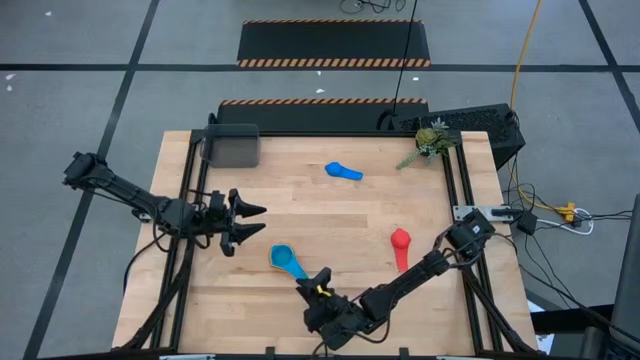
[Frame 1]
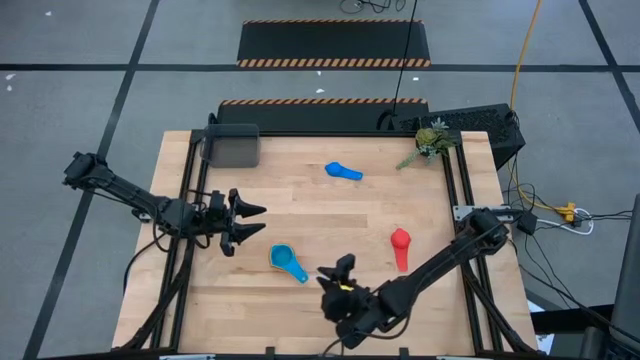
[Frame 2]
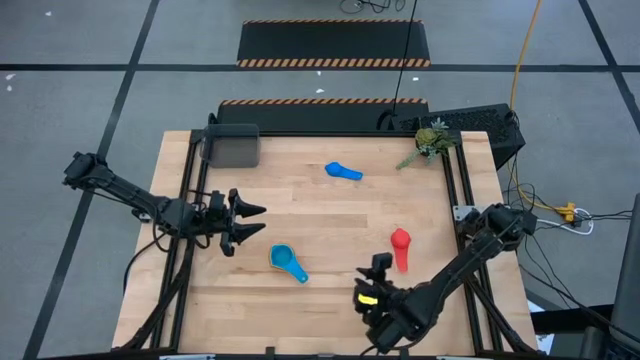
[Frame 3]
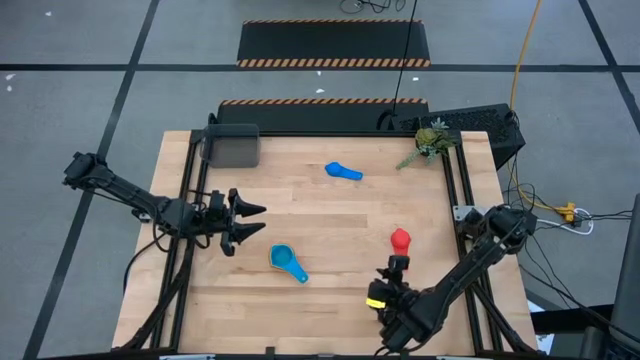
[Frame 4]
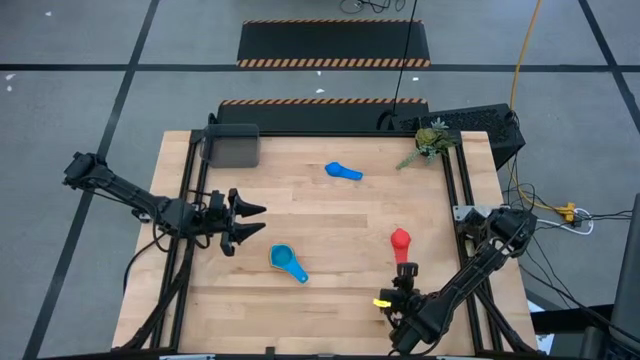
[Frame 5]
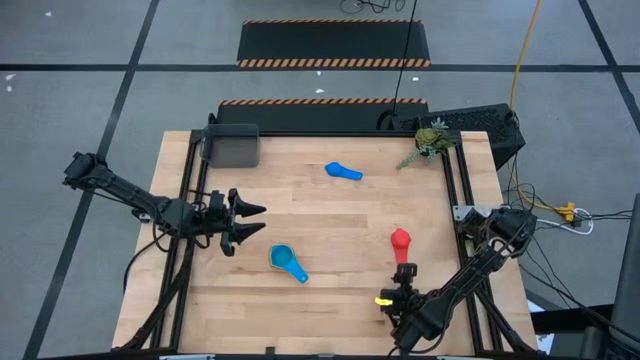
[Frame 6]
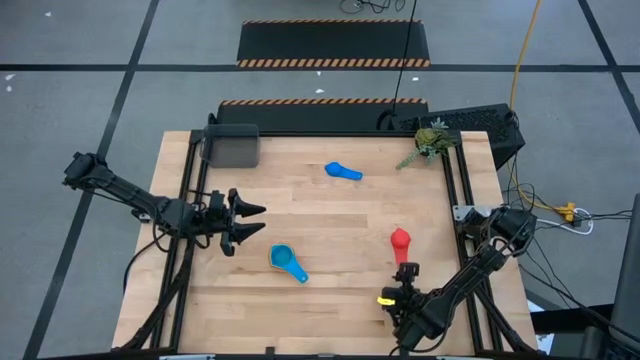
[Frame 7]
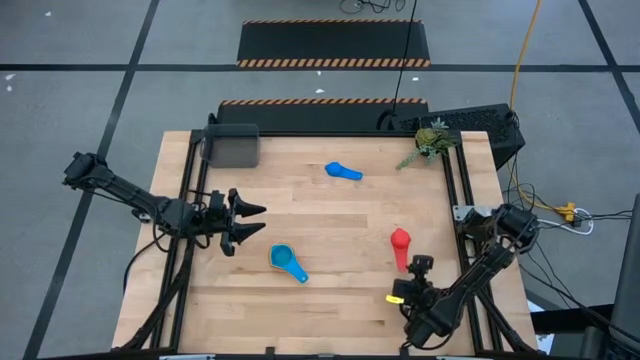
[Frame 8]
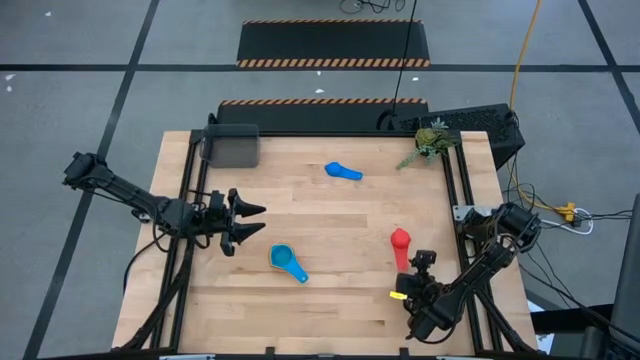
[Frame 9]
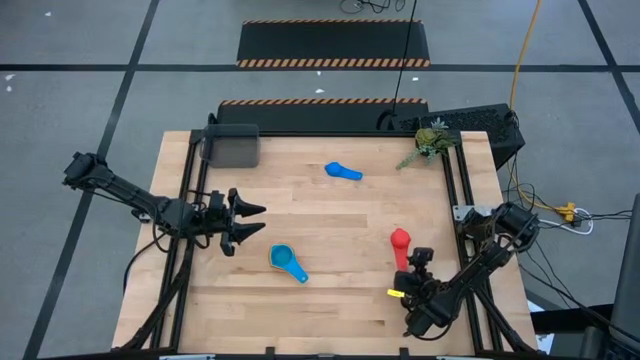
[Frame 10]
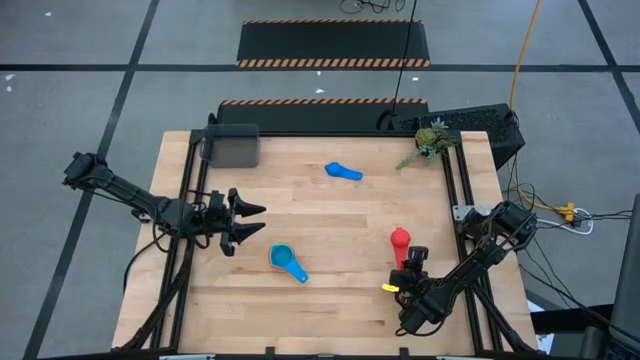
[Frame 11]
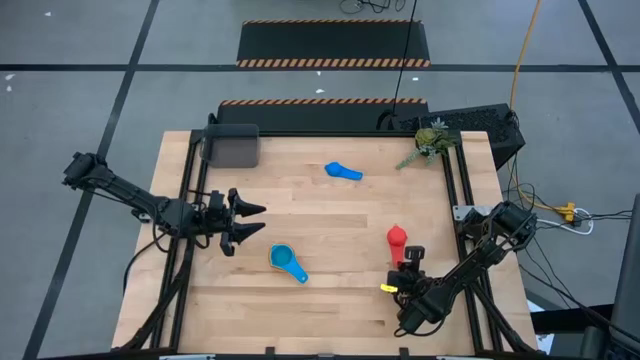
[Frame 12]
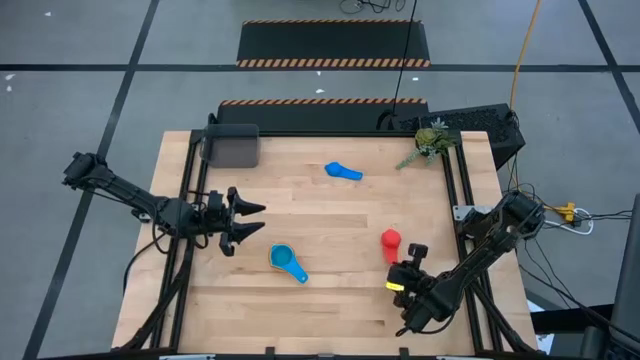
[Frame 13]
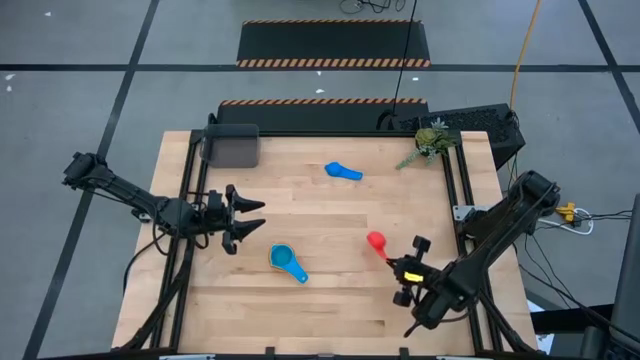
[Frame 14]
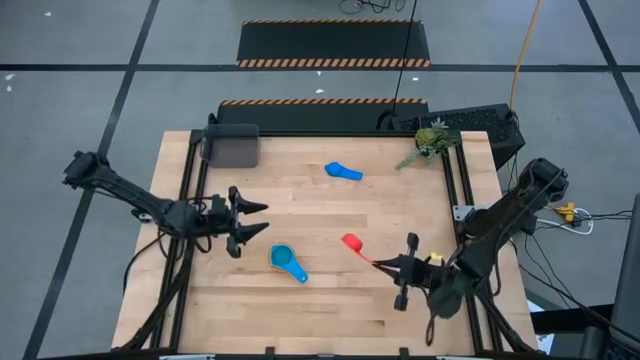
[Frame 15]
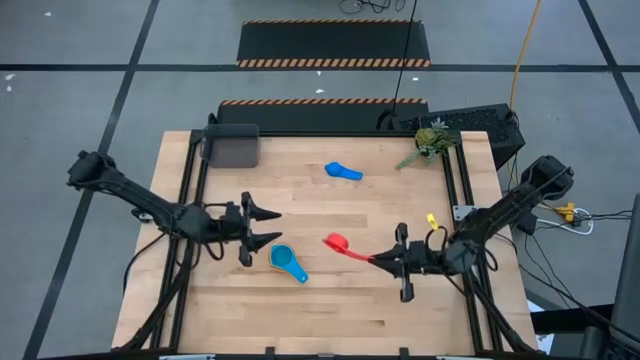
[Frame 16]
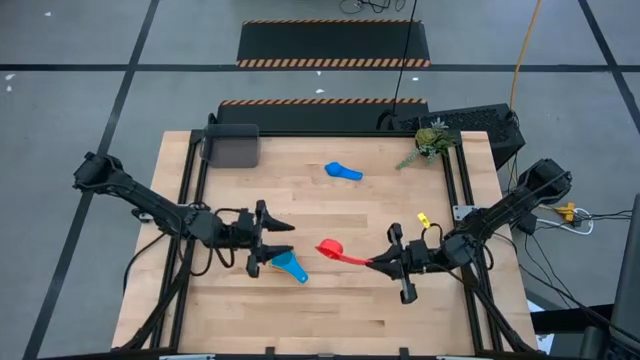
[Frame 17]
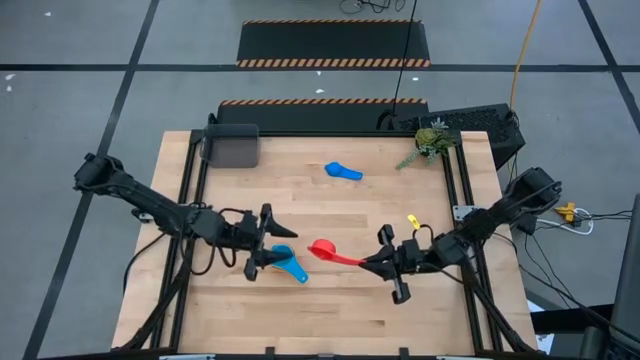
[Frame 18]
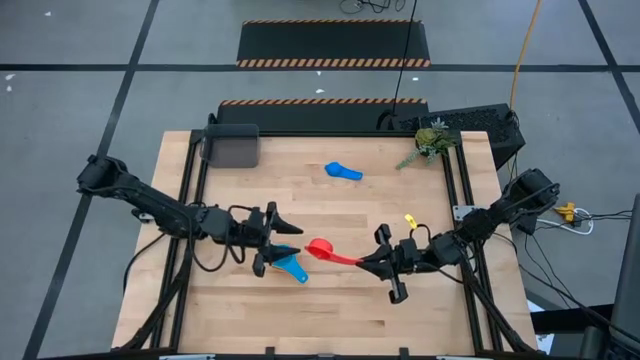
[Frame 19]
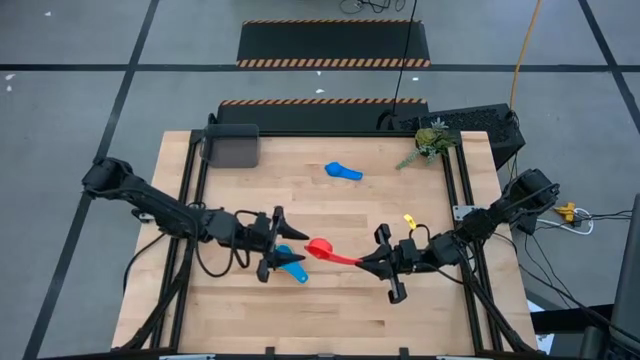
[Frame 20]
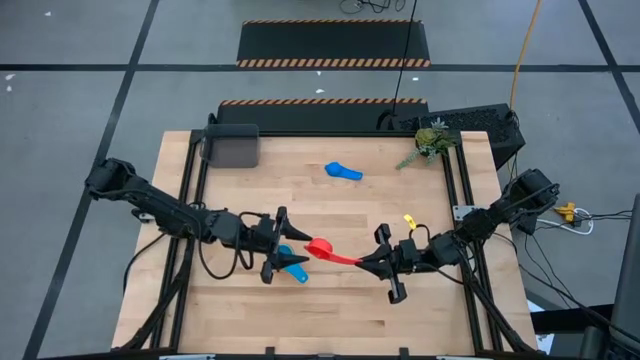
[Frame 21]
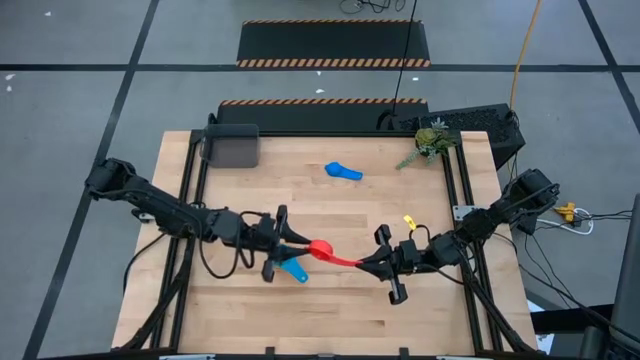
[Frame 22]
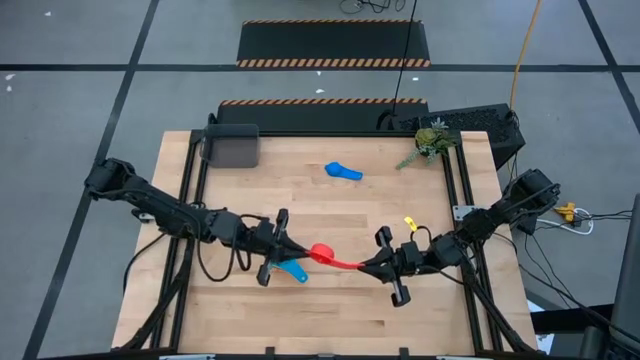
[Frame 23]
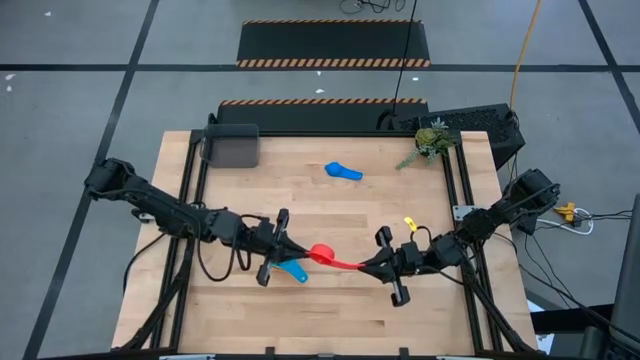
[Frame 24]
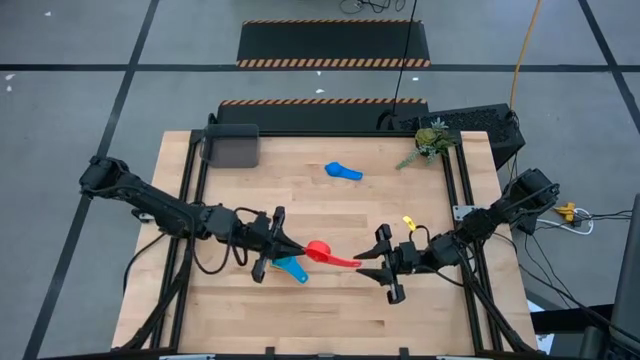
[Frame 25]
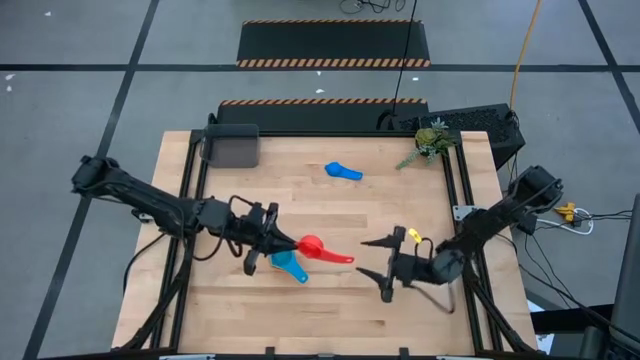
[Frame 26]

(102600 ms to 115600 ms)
Task: Nest measuring cups in basket
Stack the red measuring cup on top of the light blue measuring cup

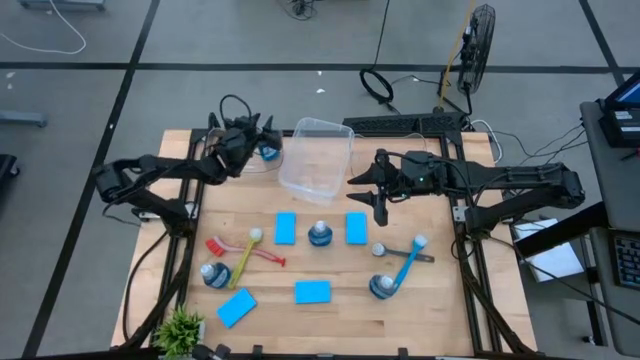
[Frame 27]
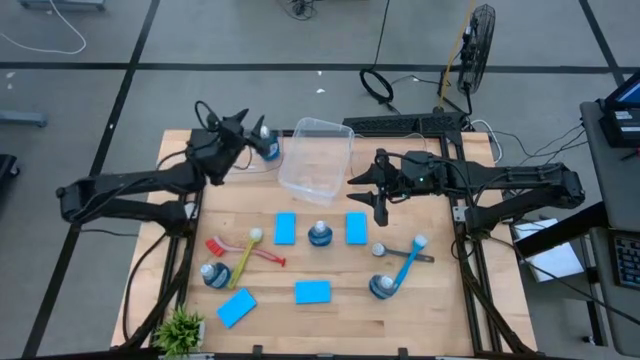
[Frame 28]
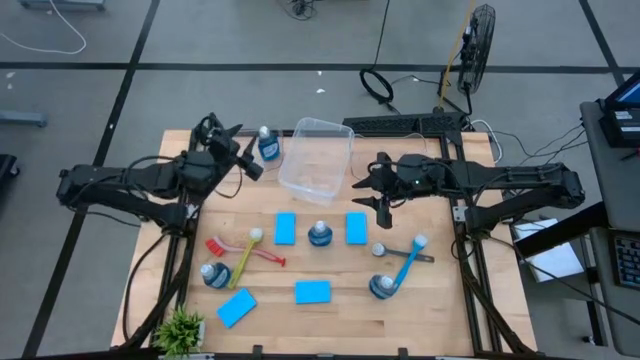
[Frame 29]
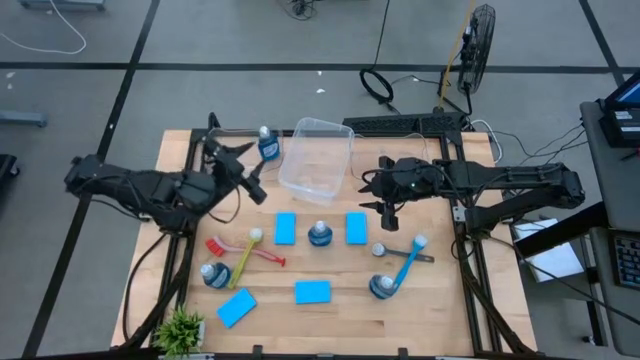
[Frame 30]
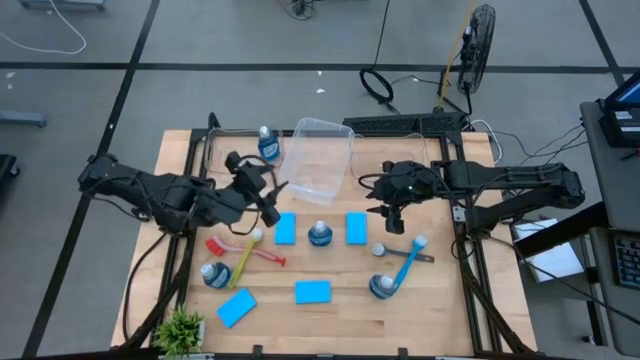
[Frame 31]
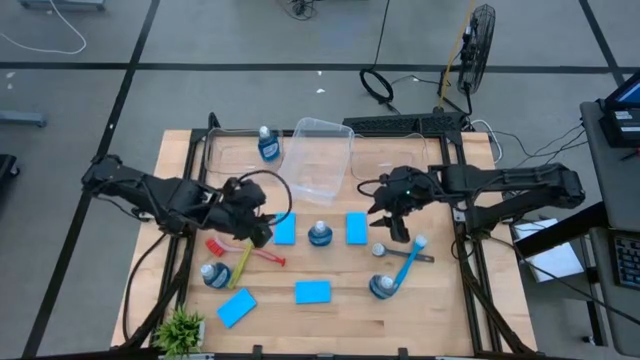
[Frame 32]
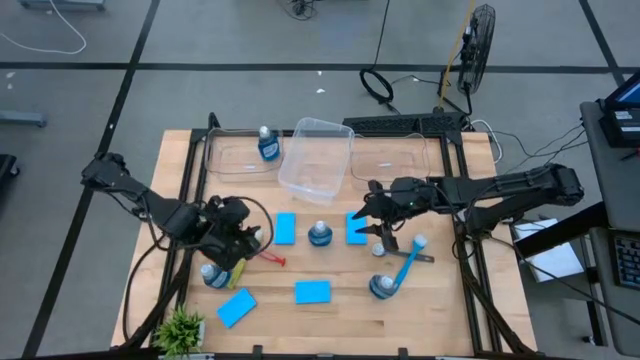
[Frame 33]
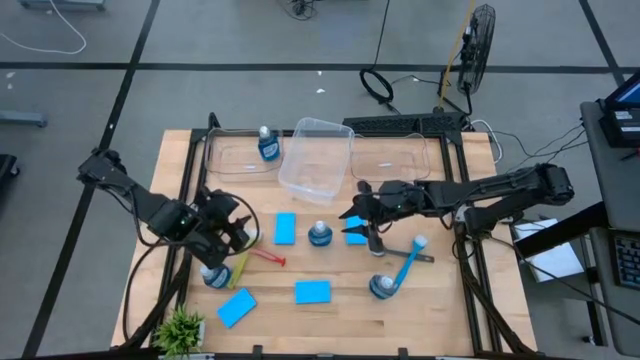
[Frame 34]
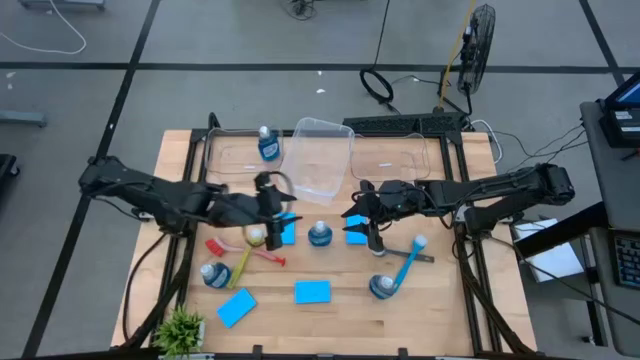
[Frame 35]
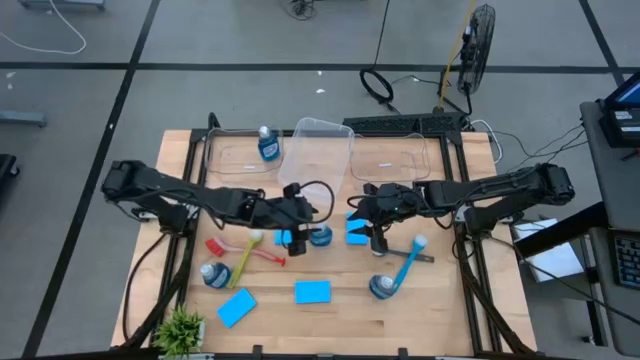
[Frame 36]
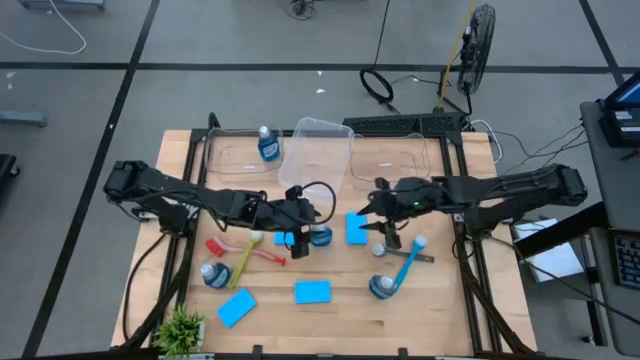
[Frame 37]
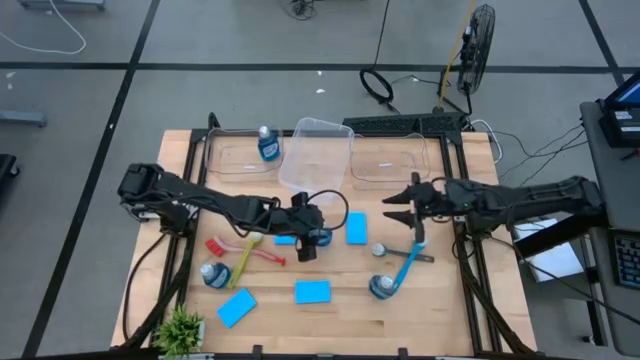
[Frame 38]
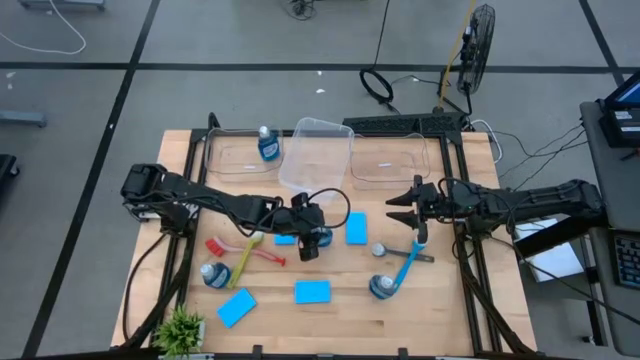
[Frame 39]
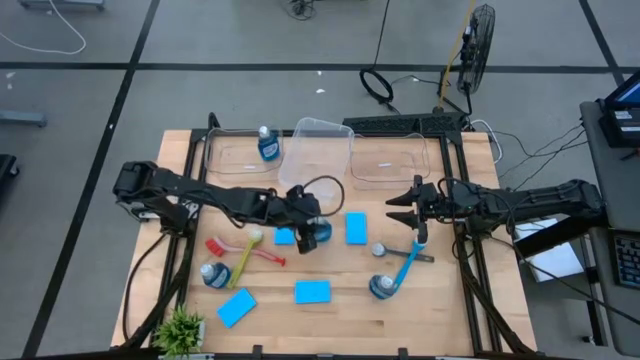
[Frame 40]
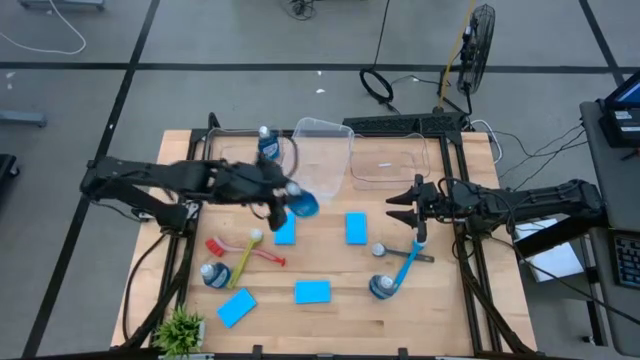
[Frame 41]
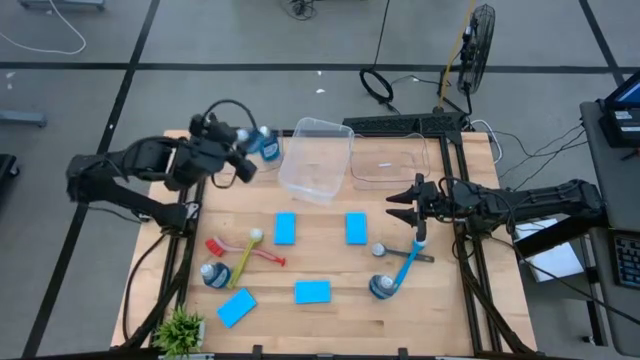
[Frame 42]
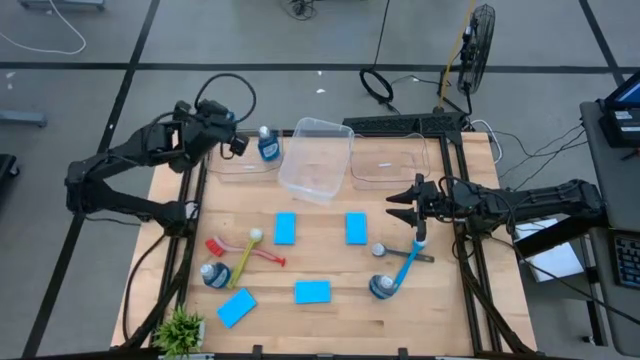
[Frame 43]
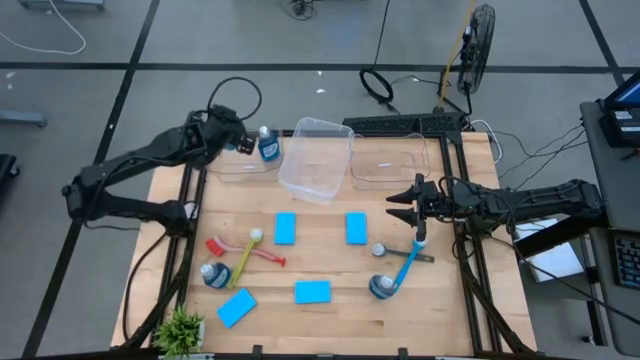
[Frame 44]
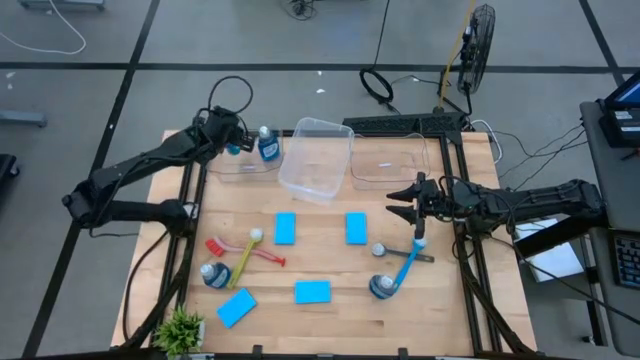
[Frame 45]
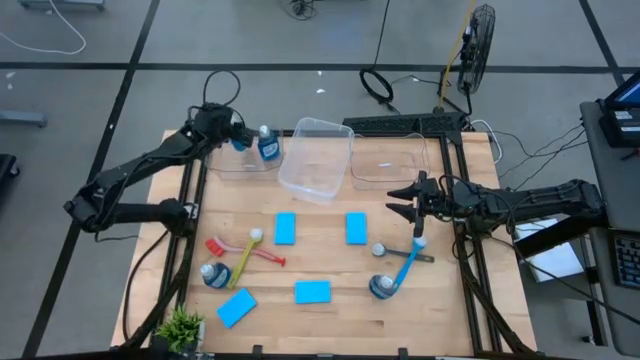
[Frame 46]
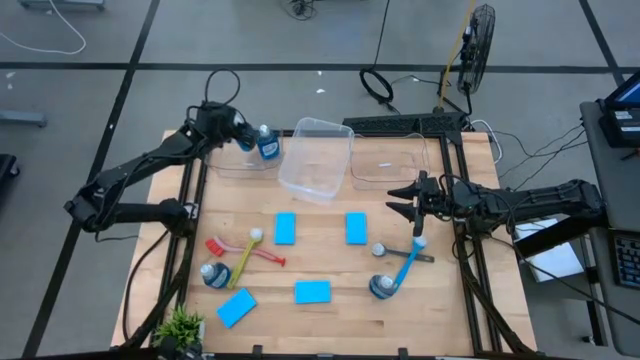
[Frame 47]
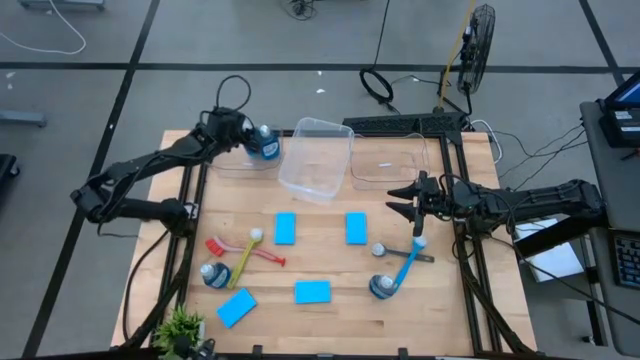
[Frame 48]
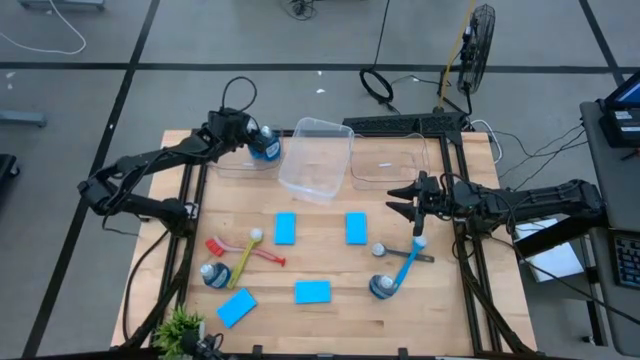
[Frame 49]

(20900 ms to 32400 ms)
Task: Pick & Place Kitchen Sink Supplies
Put the blue dishwashing liquid into the left transparent bin
